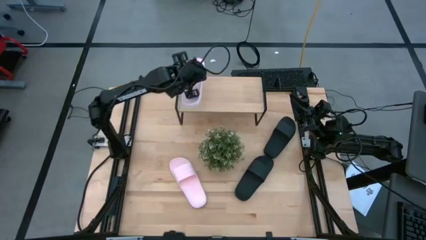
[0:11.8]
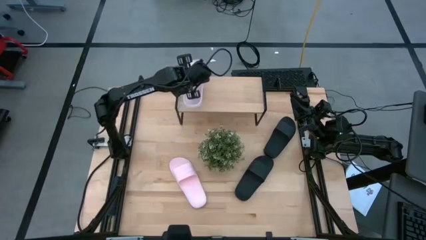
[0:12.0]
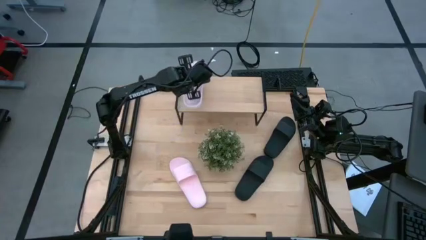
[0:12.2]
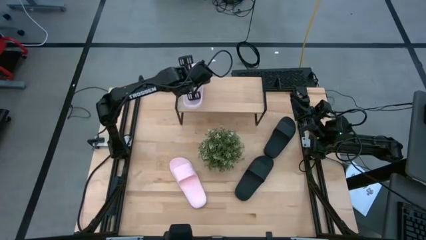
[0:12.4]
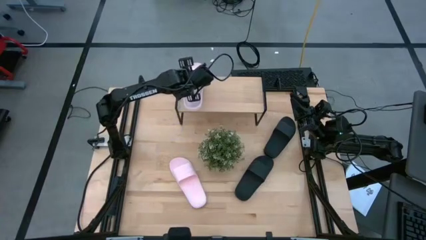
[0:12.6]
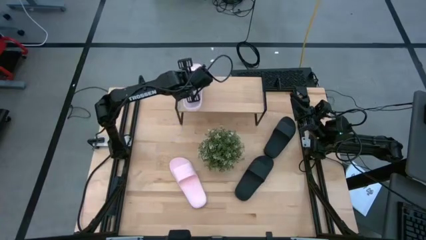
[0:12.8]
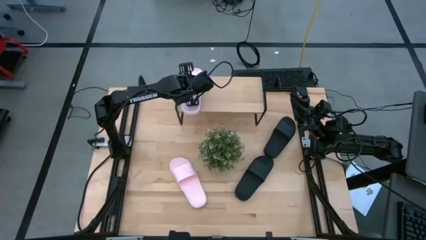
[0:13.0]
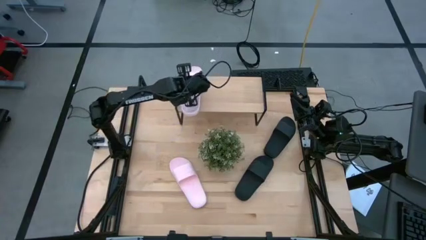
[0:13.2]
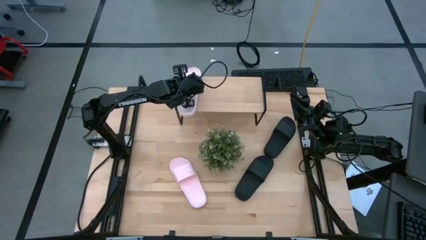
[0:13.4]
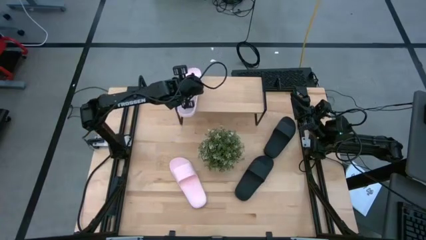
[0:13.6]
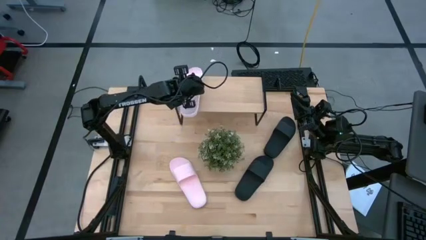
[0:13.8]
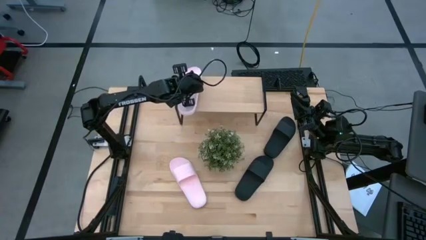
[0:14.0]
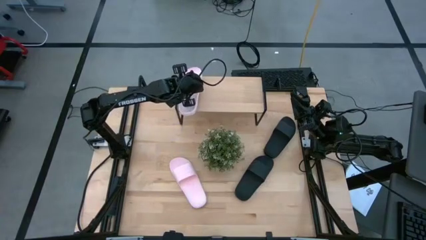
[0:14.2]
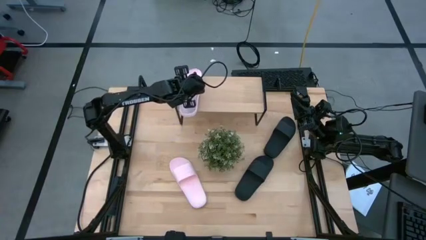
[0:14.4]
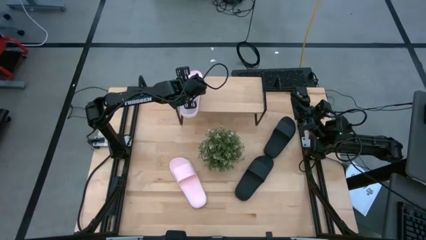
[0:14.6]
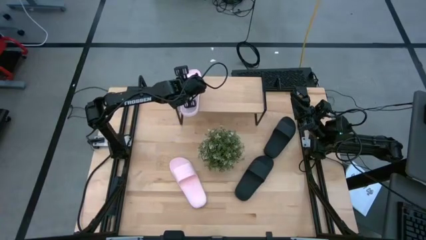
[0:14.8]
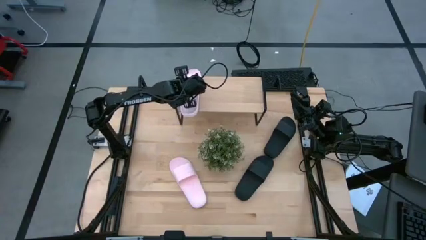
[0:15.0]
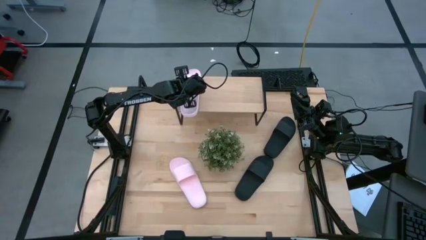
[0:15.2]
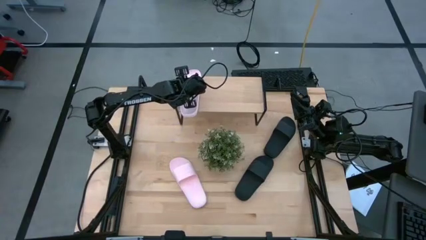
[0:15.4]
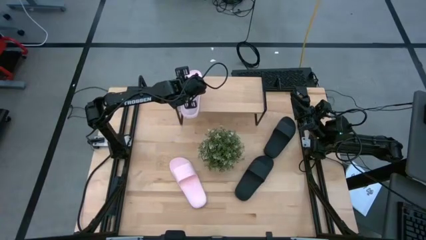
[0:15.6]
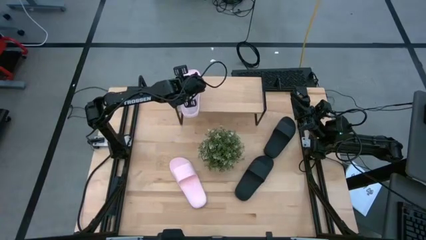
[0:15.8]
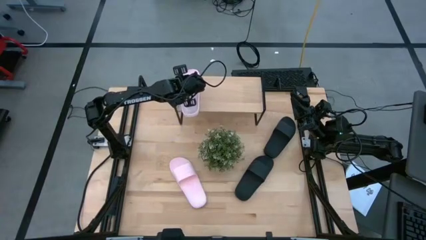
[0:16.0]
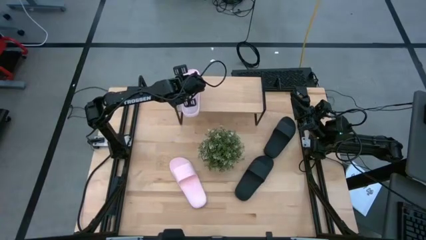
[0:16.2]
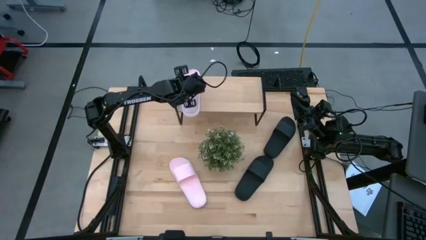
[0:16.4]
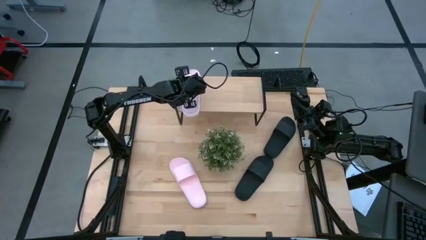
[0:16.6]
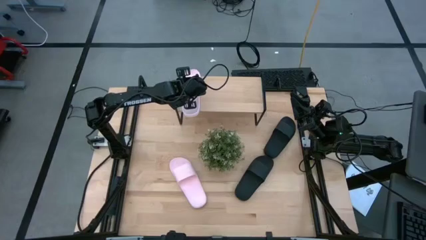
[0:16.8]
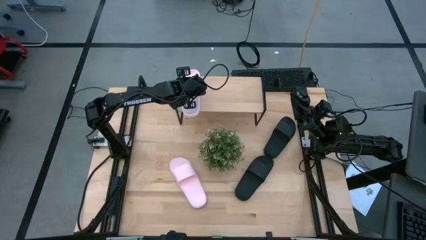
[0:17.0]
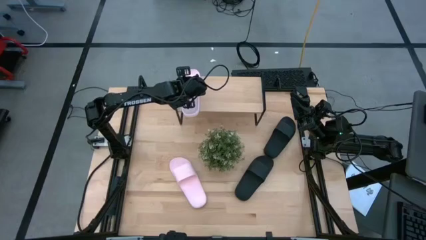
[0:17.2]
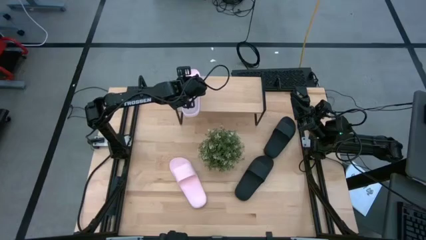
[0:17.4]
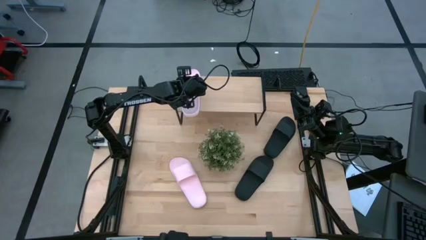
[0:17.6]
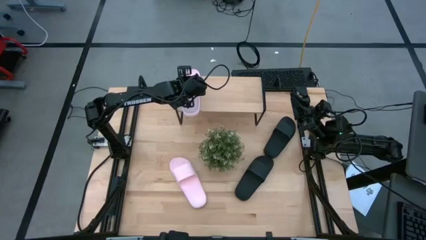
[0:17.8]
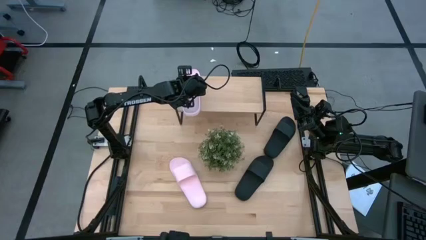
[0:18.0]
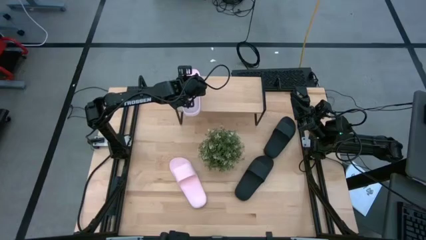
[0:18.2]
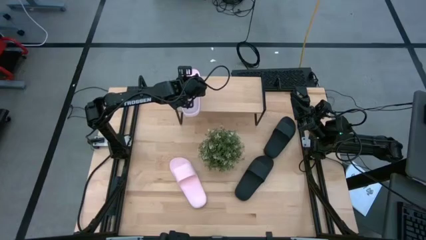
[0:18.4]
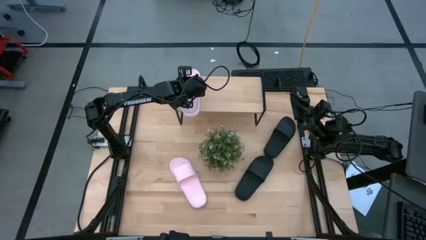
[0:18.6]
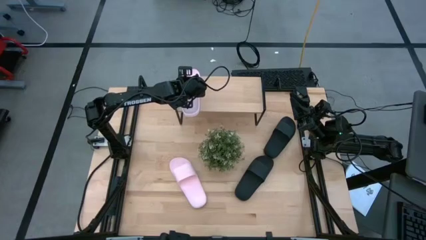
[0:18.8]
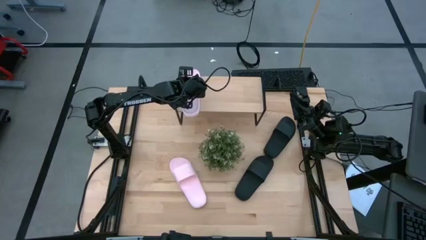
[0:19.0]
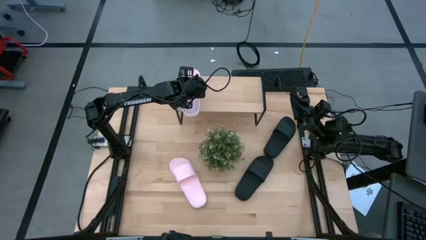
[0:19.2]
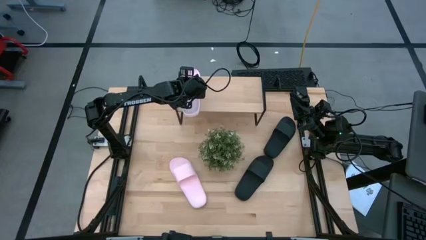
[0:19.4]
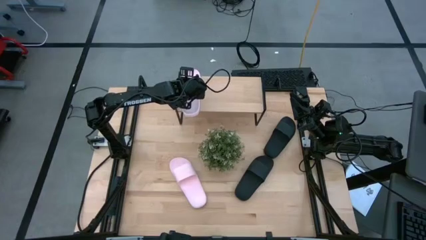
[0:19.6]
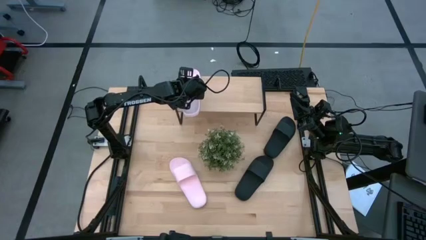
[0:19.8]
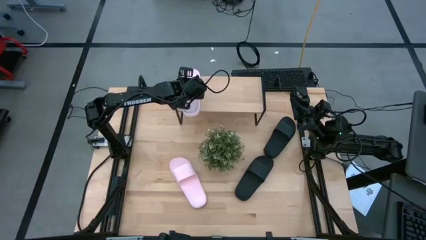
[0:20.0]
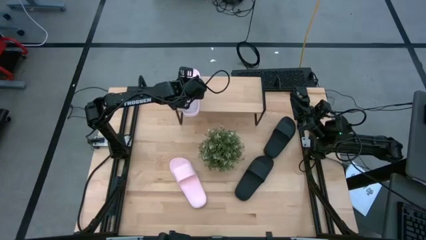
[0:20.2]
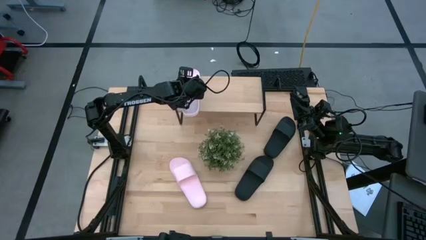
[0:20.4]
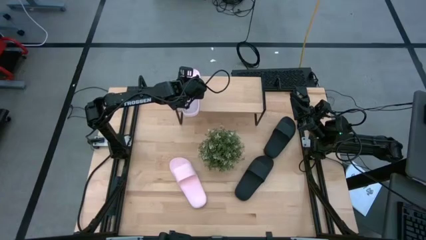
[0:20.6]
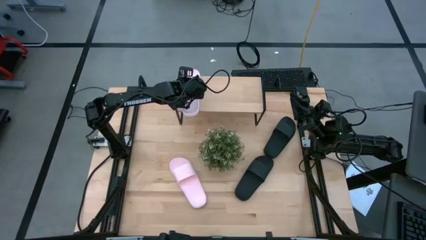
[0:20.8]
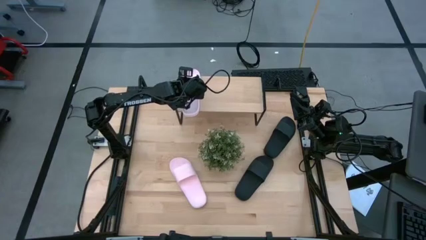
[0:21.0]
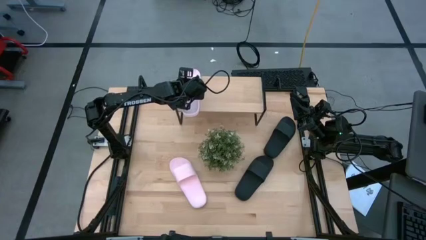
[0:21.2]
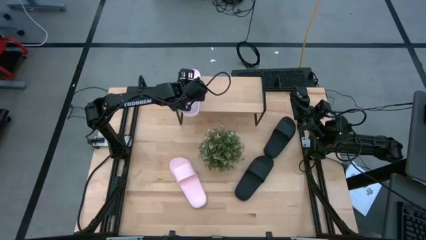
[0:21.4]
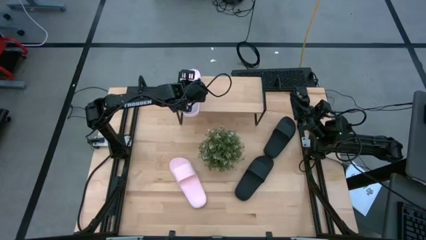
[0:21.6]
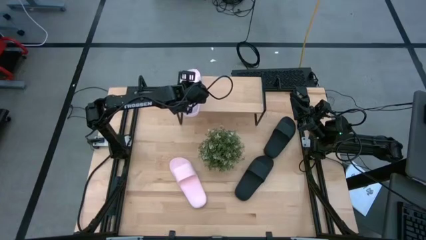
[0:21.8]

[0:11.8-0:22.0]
Task: Pick and place slides into the shelf
Put the top pink slide on the shelf
